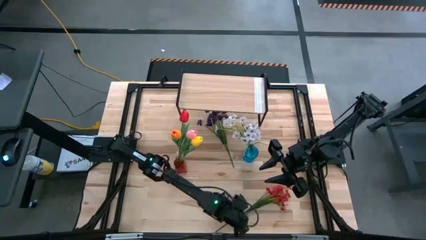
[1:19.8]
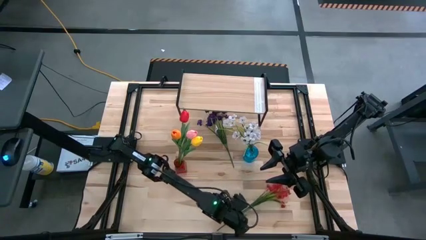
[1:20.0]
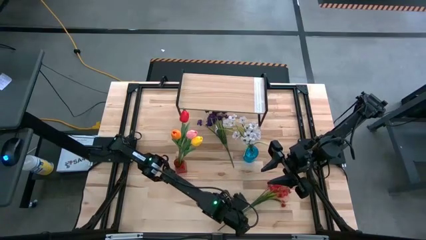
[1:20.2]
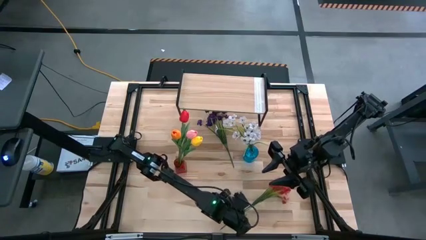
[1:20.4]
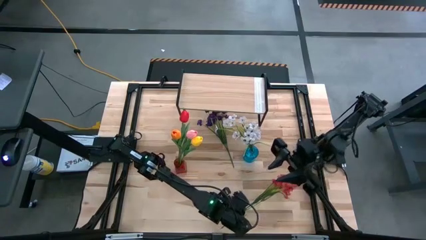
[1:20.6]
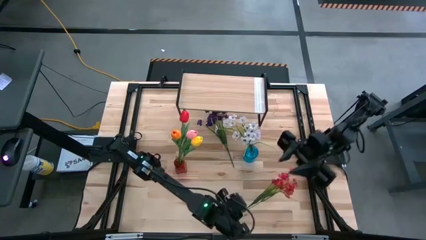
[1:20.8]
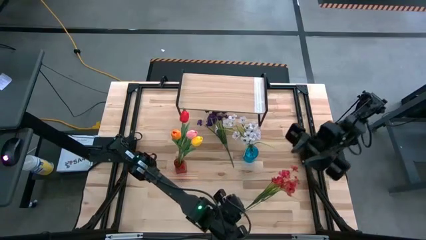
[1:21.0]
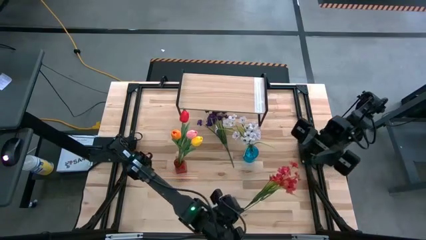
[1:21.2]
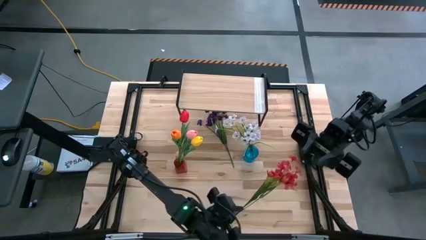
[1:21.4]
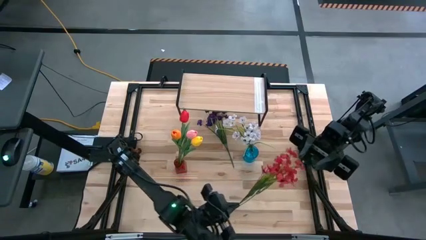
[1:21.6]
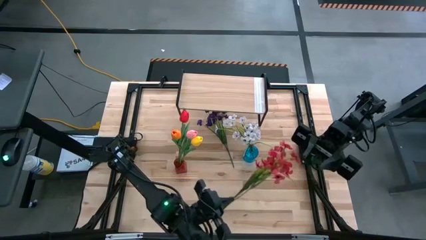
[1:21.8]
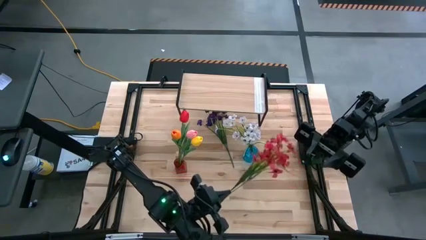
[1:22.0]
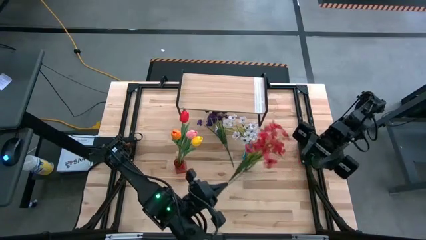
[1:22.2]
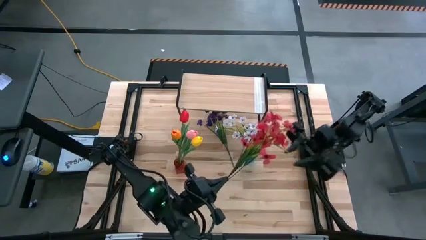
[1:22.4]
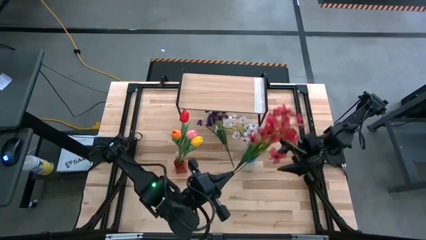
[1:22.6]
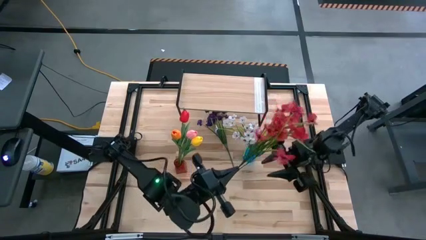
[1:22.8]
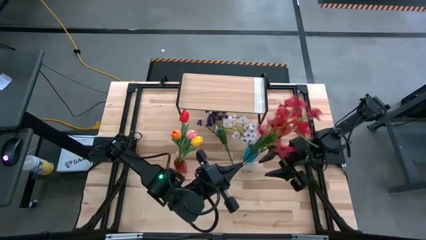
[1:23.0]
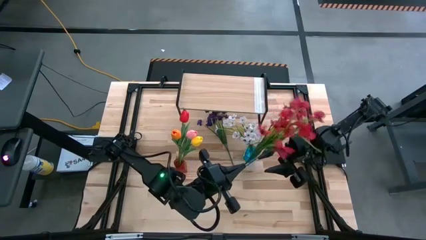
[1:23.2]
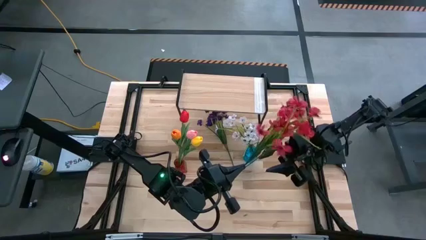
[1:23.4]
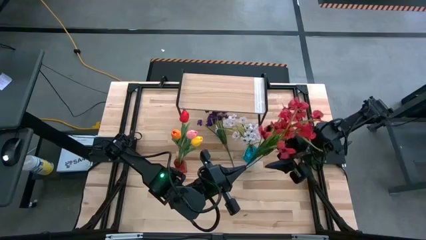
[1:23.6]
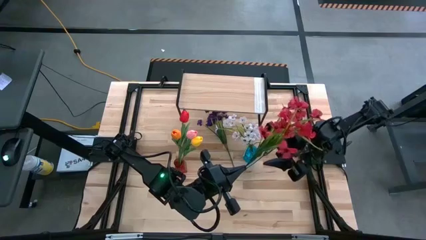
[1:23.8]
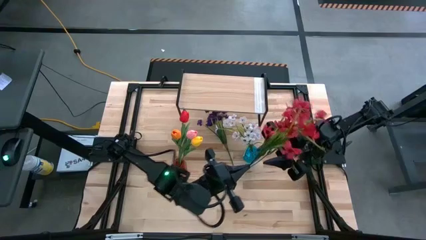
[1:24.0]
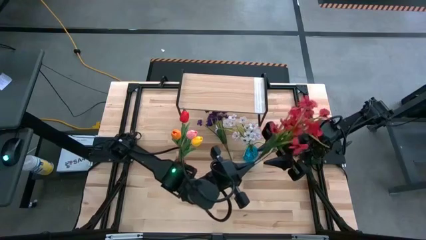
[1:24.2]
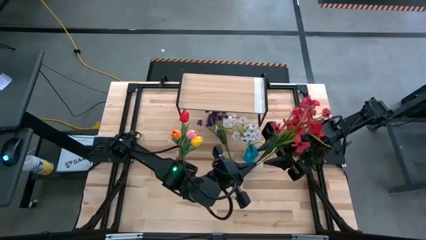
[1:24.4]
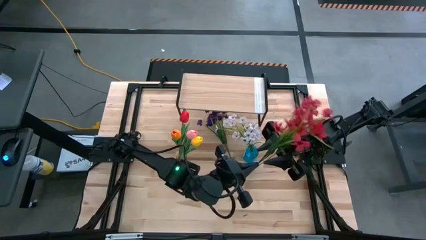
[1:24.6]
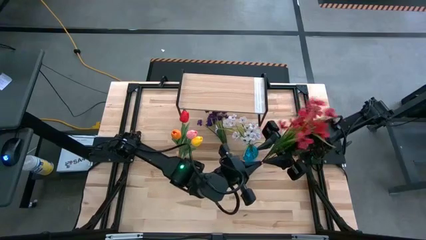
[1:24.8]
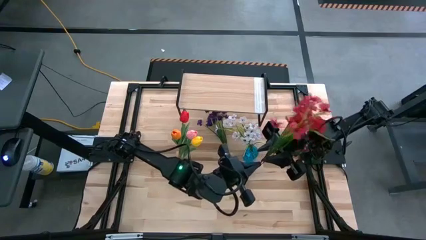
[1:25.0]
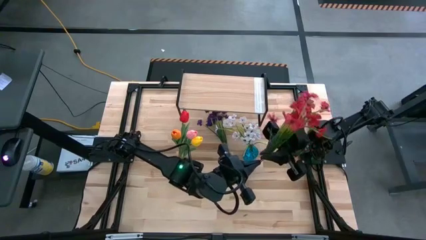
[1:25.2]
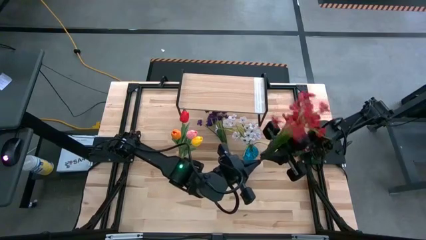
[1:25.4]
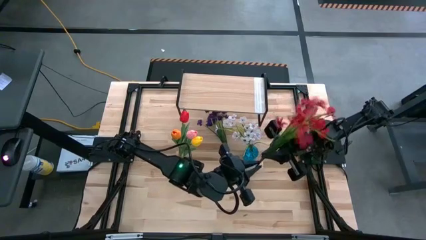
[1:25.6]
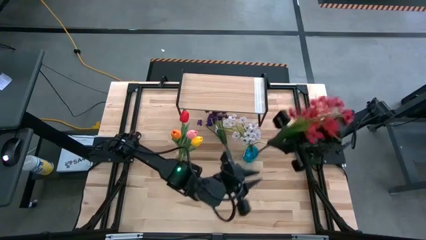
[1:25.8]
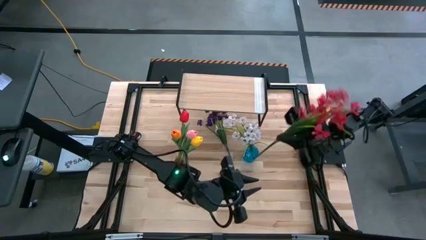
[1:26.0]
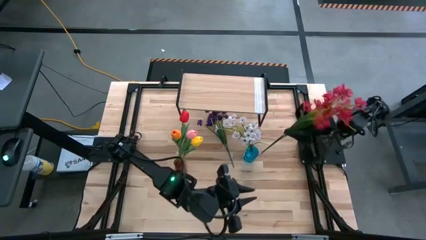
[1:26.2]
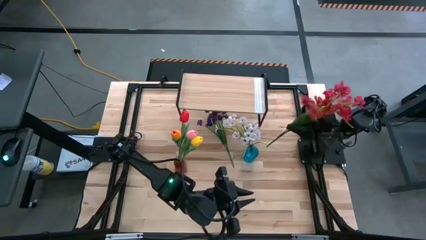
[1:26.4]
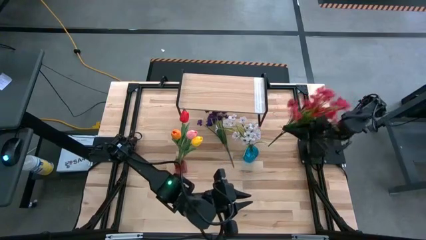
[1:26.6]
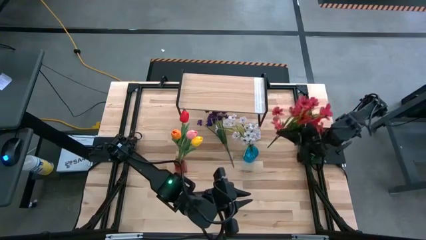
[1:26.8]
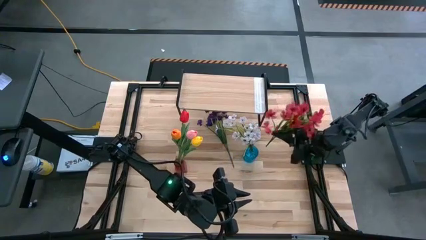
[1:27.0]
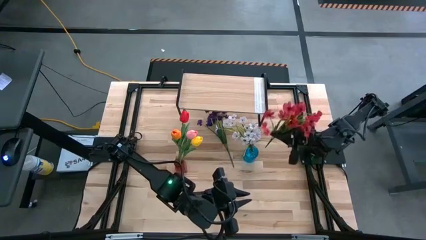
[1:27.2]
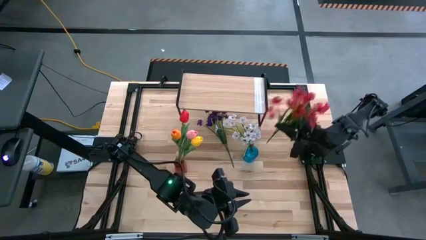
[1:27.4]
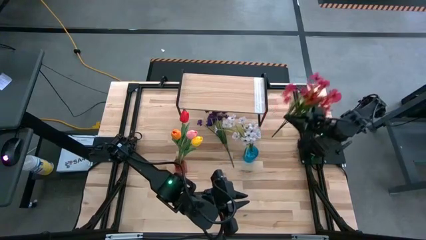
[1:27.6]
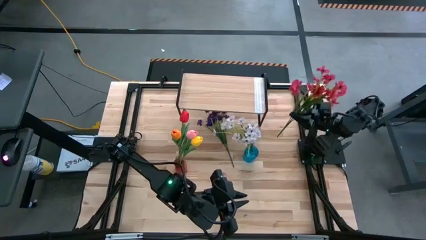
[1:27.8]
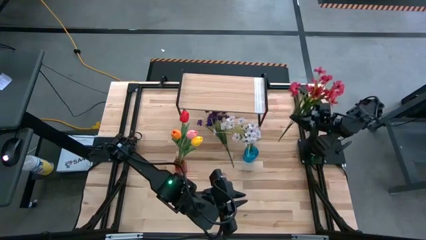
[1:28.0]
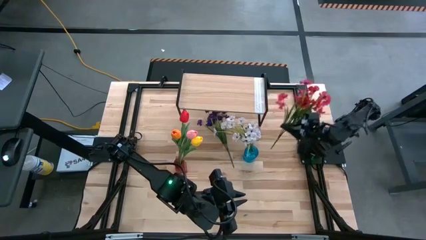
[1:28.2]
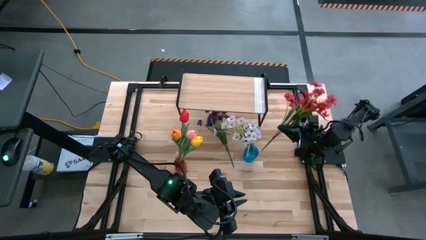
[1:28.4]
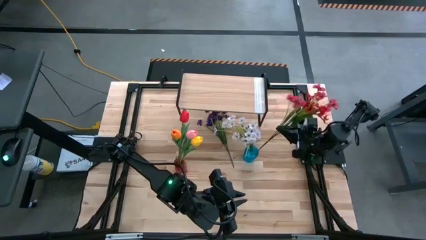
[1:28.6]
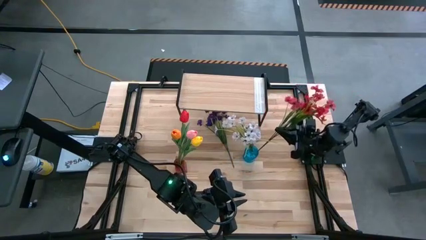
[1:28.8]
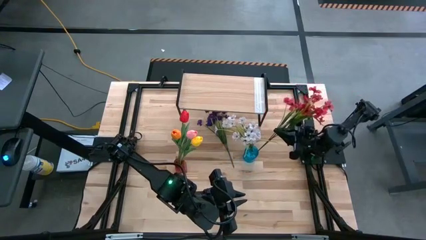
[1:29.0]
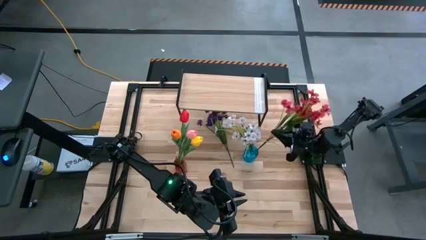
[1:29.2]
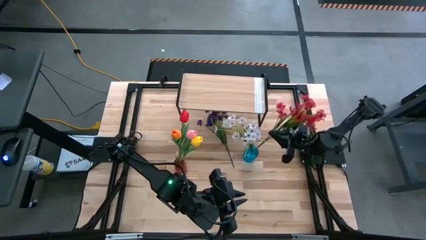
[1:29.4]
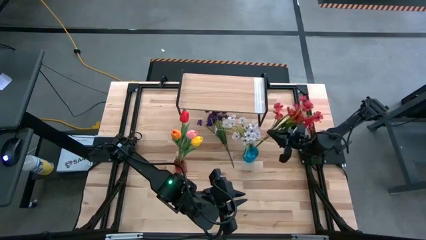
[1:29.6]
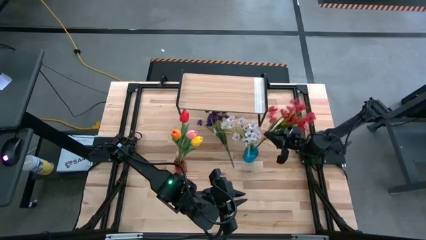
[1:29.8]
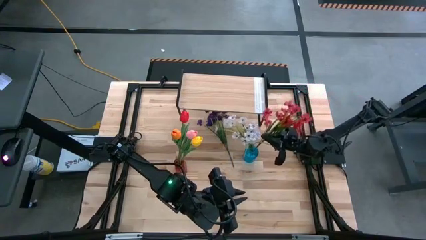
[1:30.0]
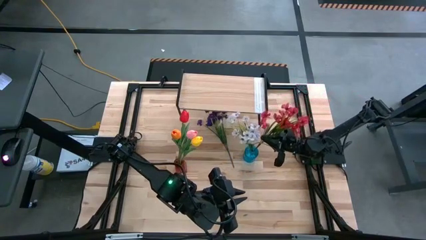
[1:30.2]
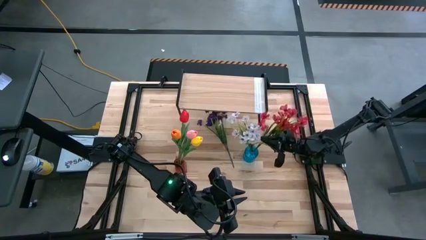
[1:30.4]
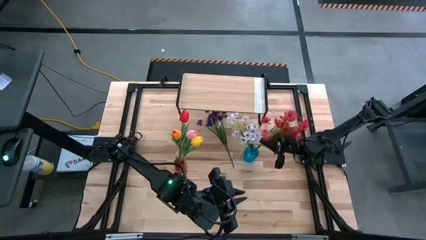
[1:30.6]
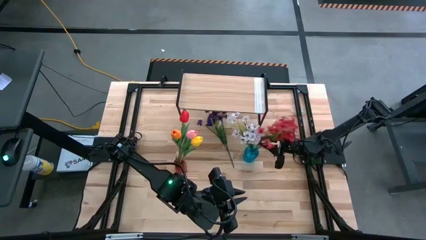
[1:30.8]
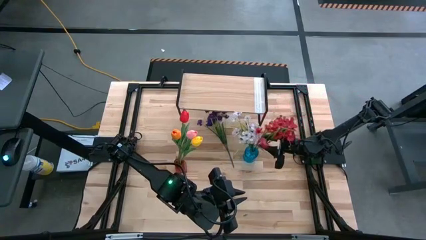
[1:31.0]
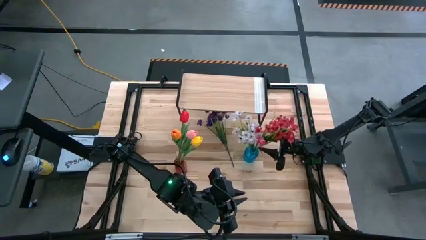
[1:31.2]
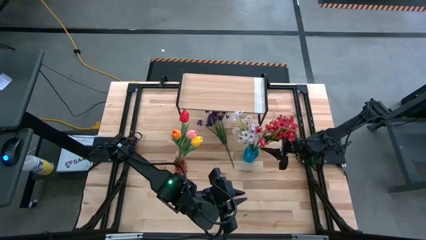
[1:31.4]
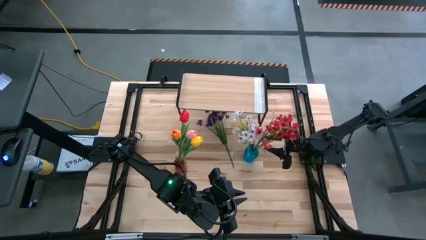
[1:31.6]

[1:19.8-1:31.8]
Task: Pick and place flowers into a vace then onto a shelf
Put the red flowers into the blue vase

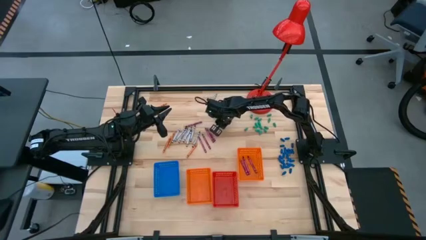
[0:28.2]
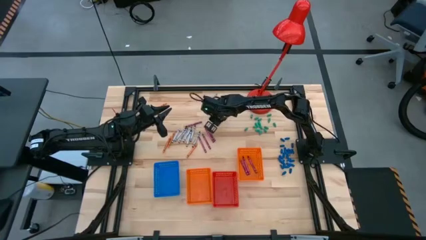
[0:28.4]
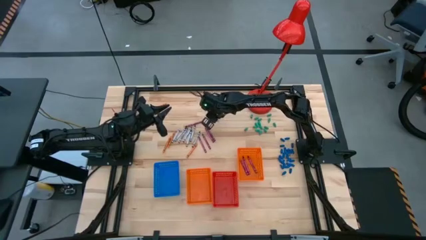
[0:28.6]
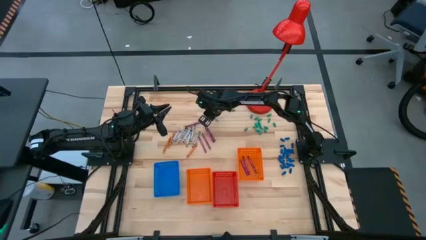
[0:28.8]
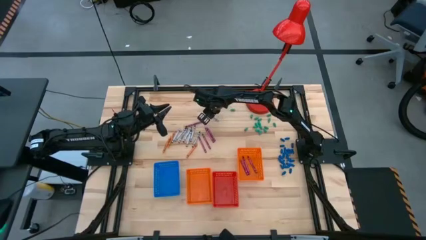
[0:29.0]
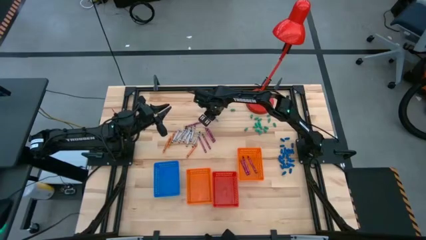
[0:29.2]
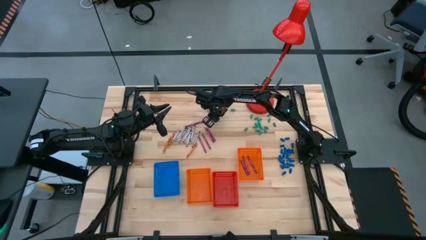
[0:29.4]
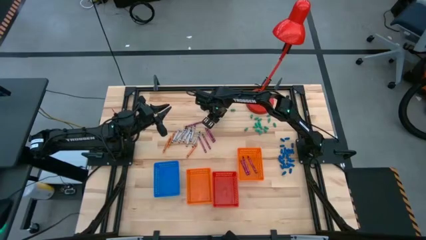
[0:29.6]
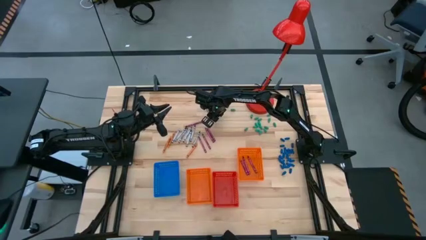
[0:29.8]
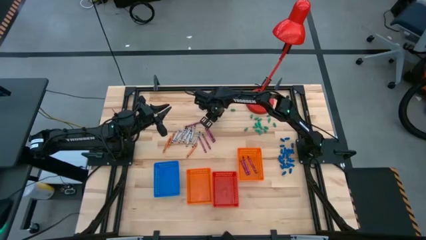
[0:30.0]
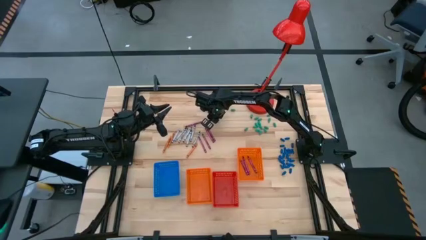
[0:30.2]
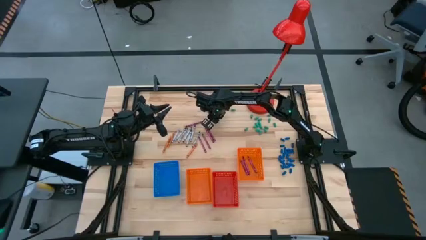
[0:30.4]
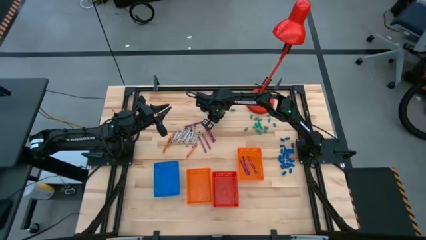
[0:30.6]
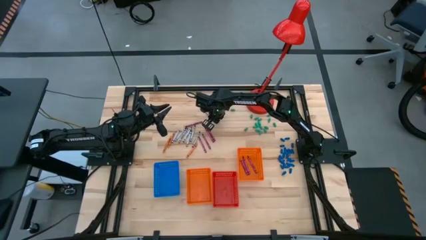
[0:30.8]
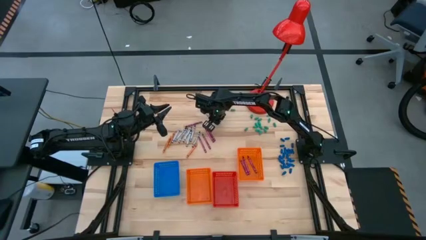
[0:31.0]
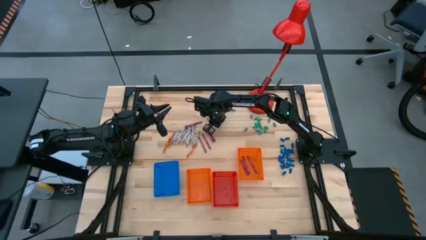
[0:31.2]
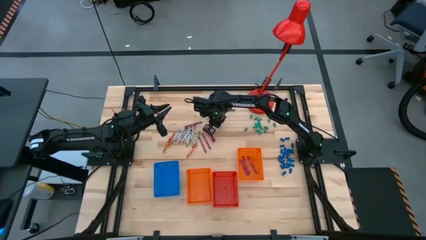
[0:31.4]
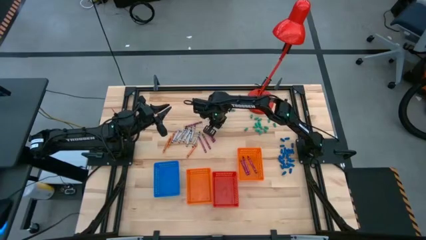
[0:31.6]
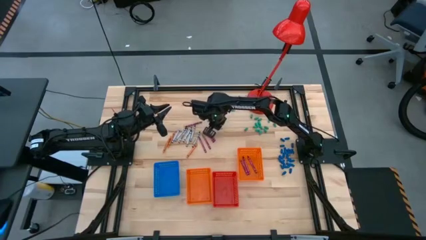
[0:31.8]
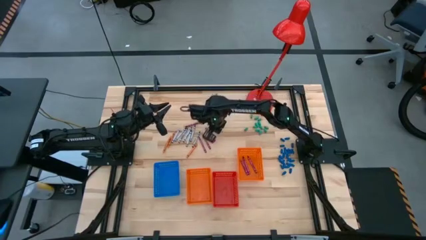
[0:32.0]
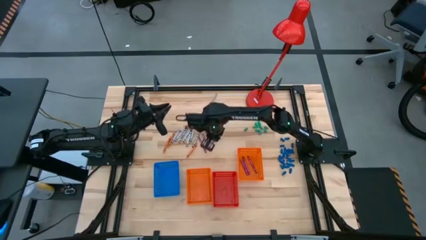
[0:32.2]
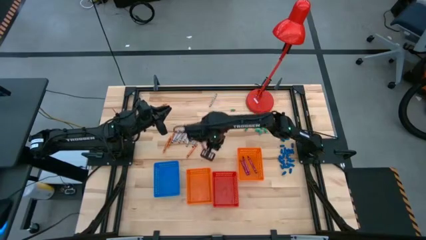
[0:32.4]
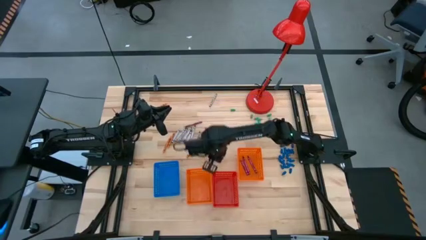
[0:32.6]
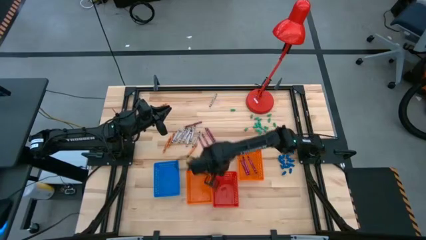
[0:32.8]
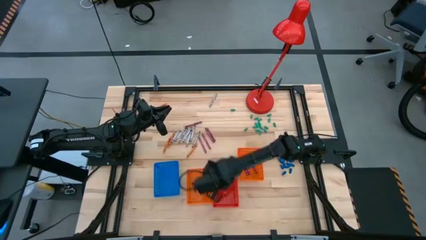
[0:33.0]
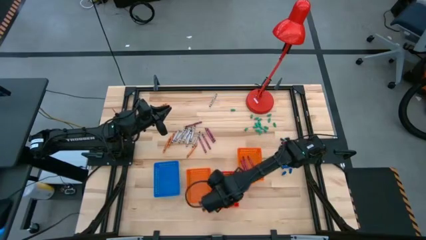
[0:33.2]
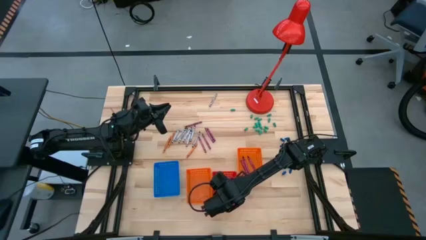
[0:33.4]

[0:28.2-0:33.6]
Task: Sort crayons
Put the gray crayon into the red bin
